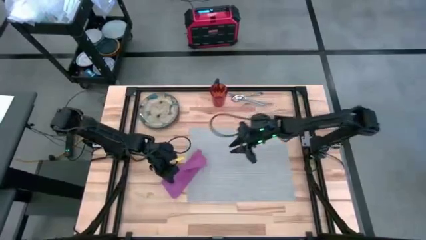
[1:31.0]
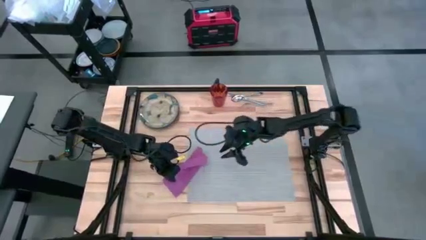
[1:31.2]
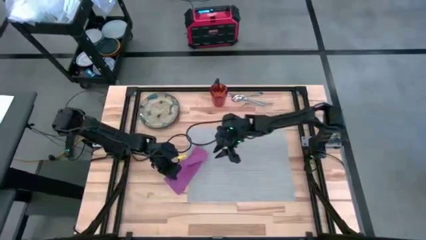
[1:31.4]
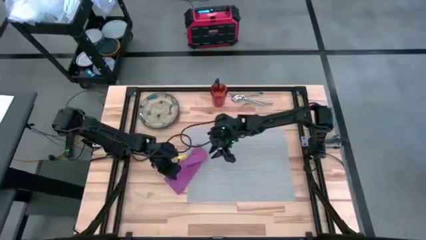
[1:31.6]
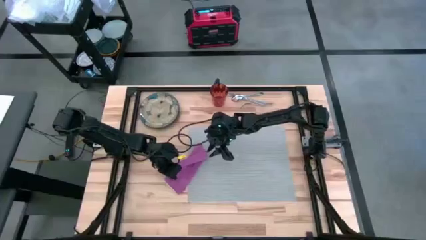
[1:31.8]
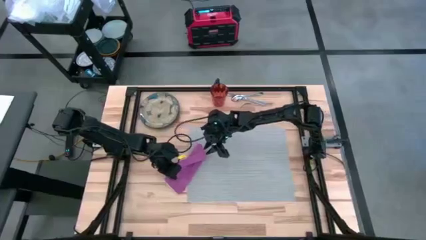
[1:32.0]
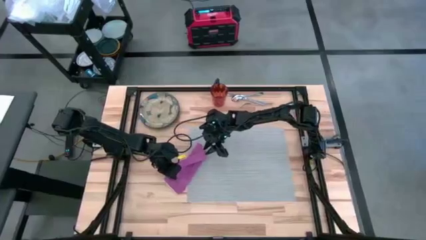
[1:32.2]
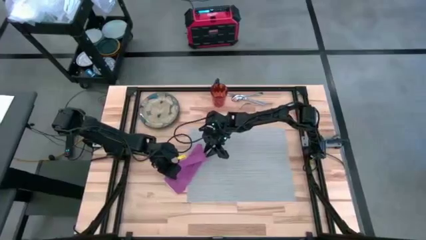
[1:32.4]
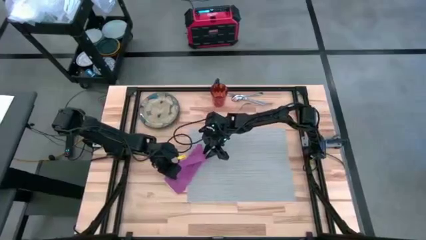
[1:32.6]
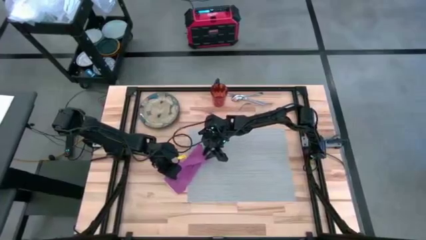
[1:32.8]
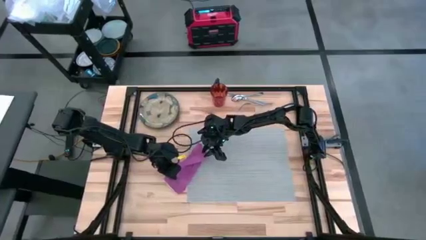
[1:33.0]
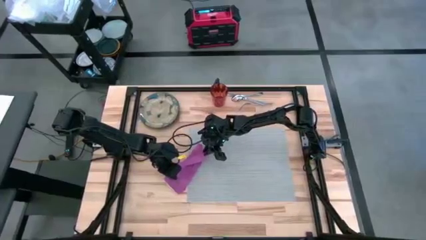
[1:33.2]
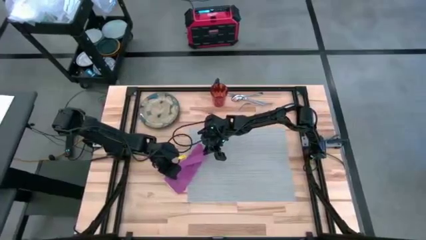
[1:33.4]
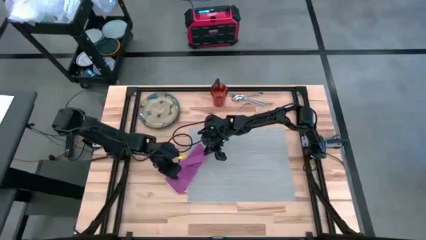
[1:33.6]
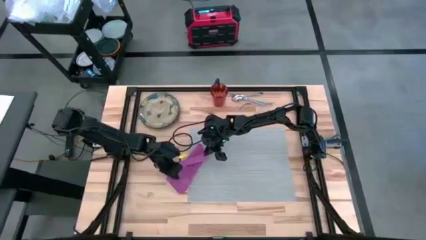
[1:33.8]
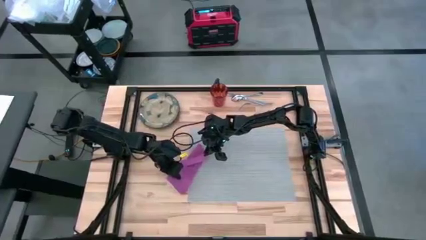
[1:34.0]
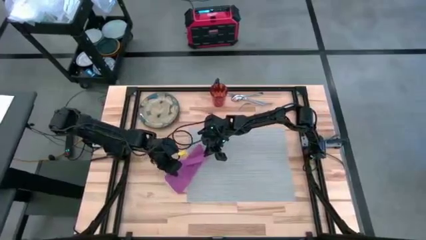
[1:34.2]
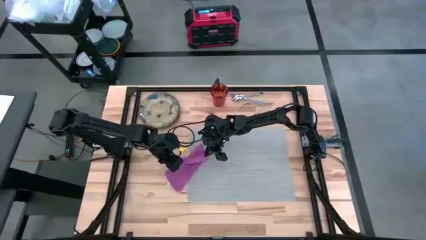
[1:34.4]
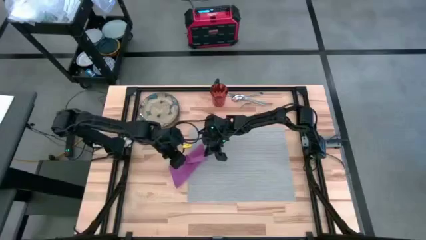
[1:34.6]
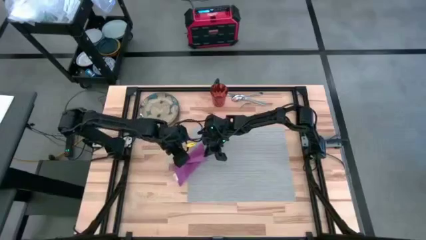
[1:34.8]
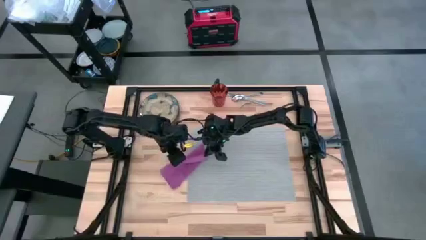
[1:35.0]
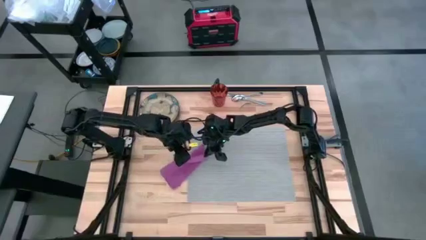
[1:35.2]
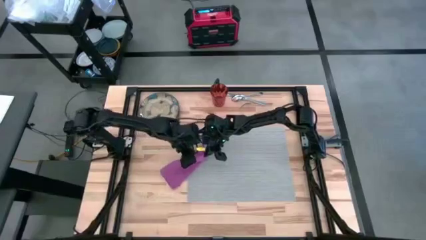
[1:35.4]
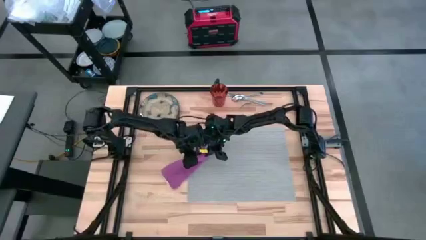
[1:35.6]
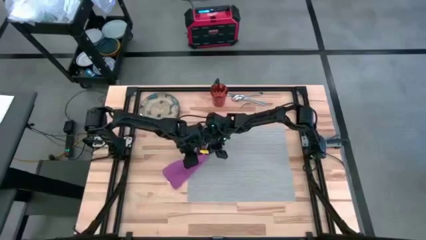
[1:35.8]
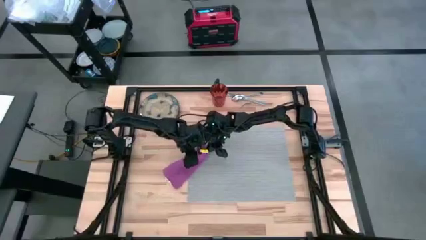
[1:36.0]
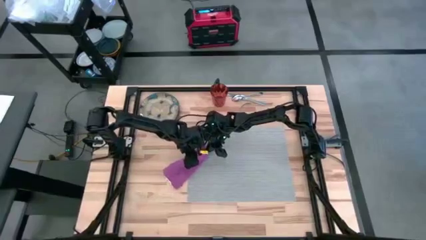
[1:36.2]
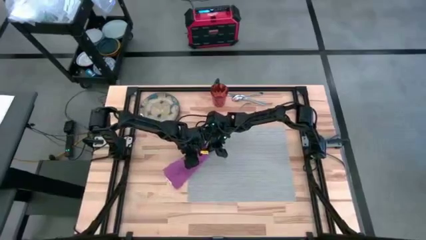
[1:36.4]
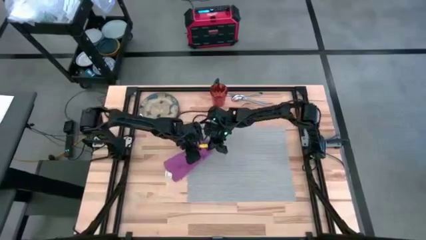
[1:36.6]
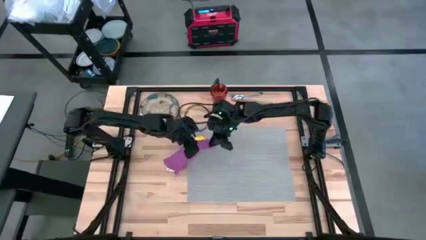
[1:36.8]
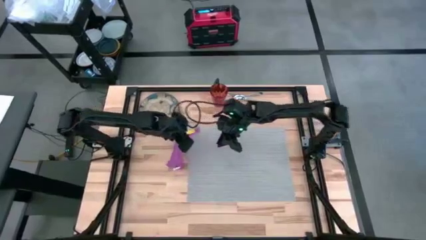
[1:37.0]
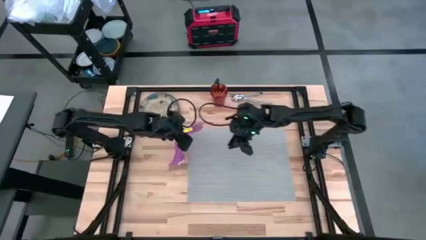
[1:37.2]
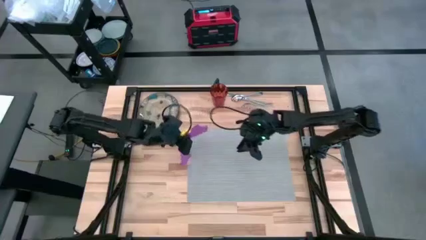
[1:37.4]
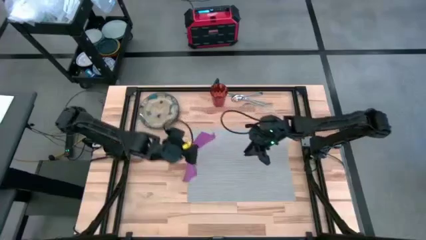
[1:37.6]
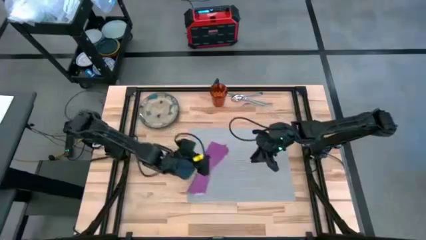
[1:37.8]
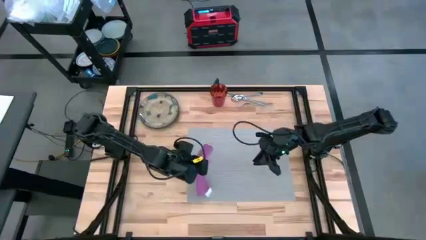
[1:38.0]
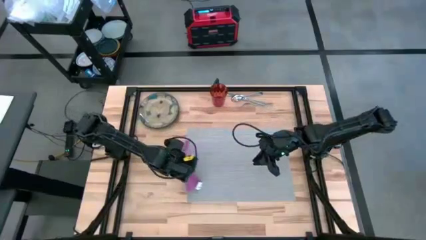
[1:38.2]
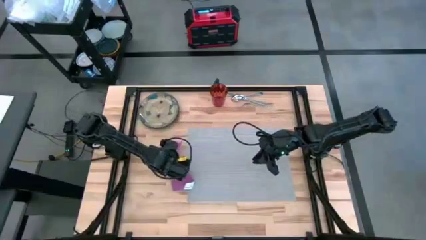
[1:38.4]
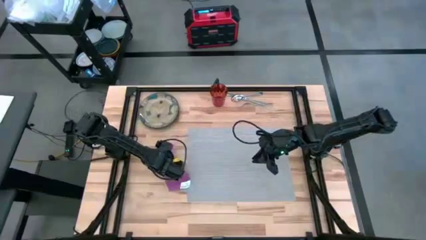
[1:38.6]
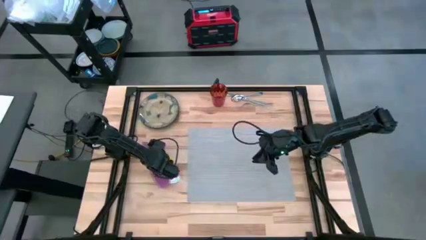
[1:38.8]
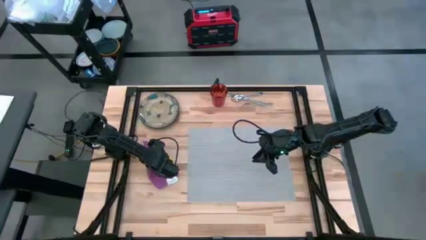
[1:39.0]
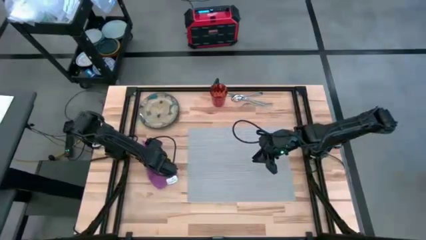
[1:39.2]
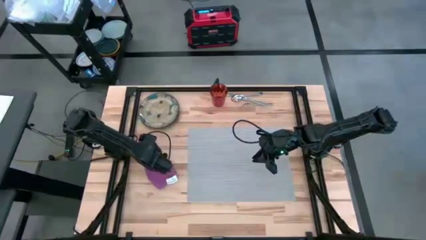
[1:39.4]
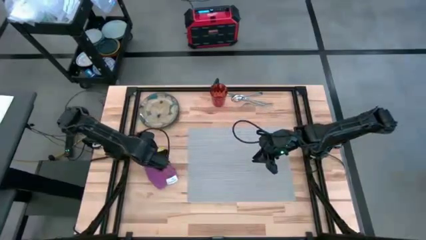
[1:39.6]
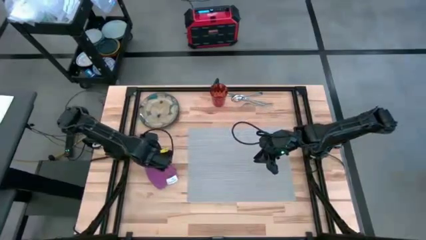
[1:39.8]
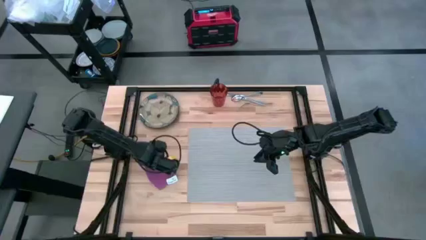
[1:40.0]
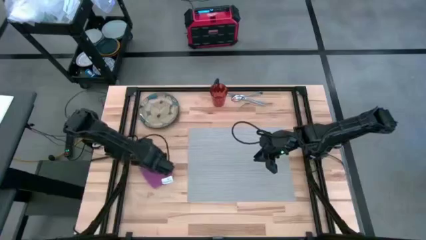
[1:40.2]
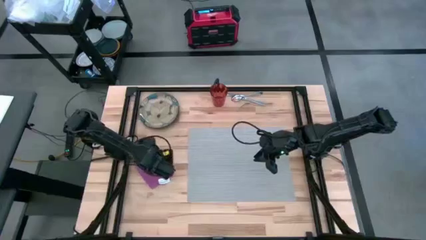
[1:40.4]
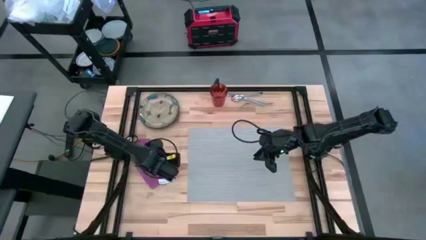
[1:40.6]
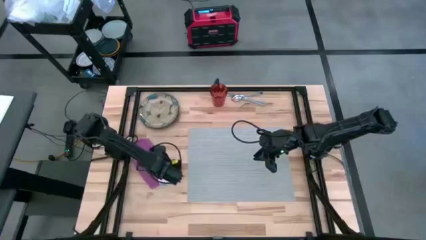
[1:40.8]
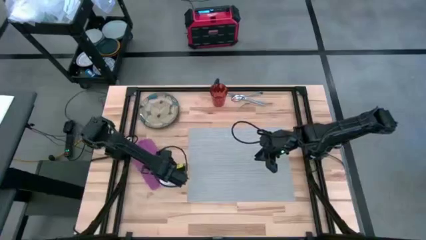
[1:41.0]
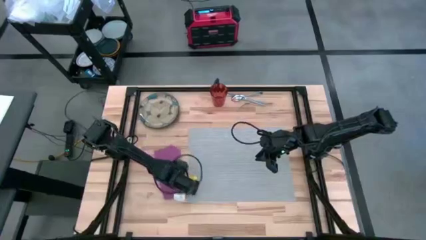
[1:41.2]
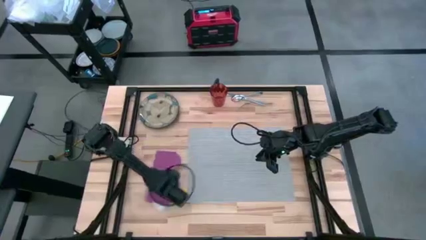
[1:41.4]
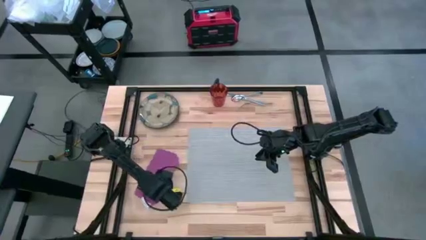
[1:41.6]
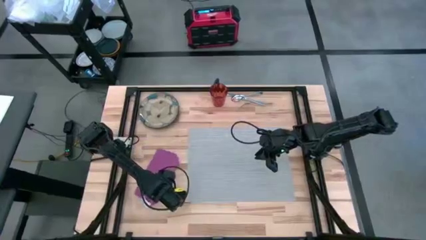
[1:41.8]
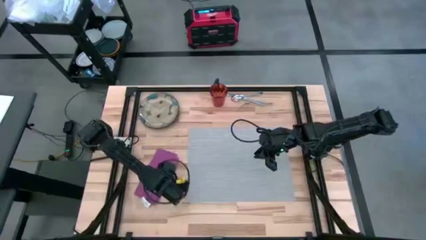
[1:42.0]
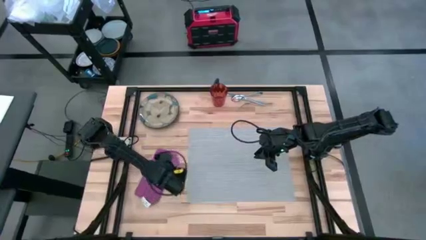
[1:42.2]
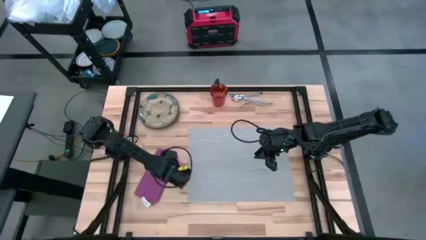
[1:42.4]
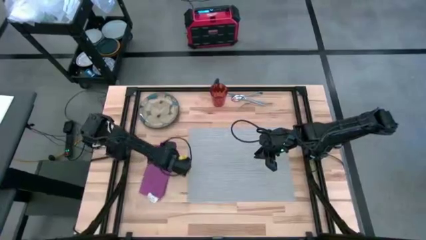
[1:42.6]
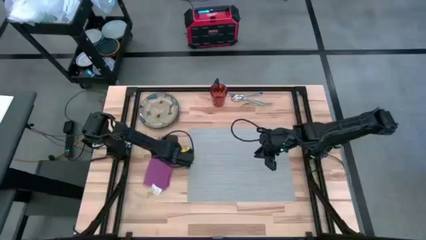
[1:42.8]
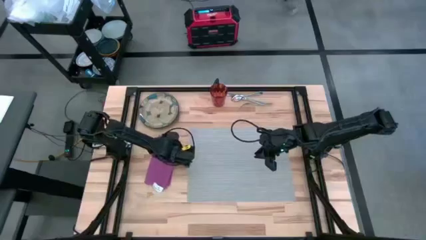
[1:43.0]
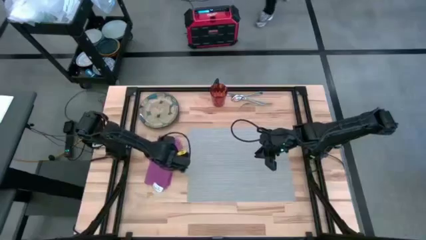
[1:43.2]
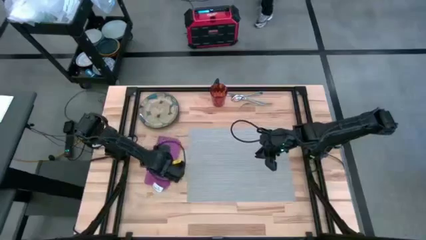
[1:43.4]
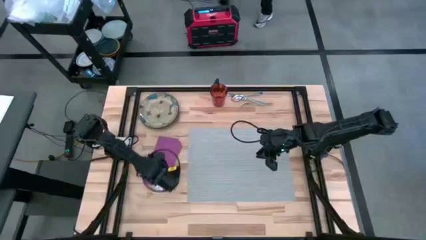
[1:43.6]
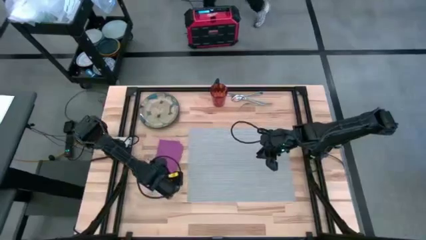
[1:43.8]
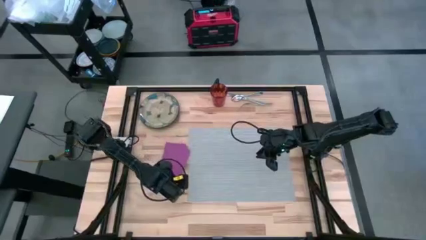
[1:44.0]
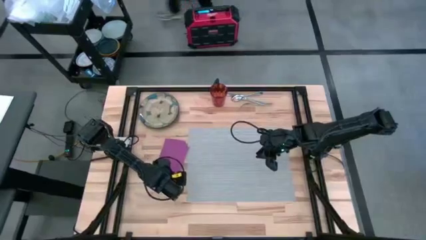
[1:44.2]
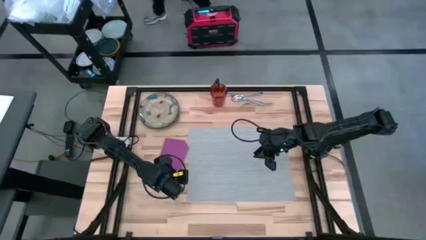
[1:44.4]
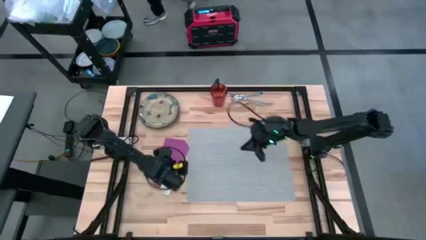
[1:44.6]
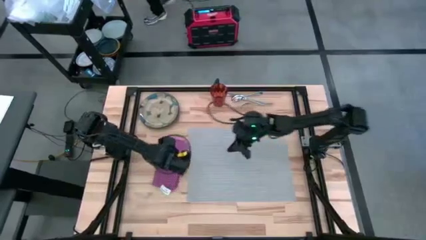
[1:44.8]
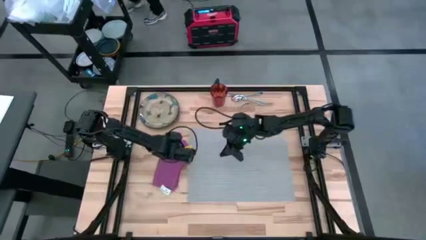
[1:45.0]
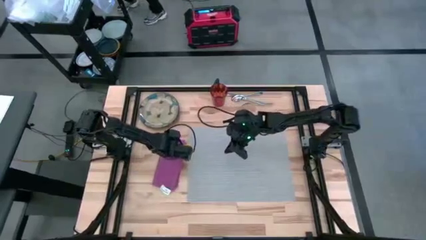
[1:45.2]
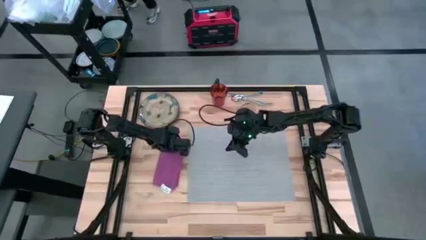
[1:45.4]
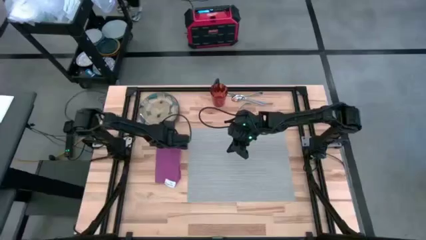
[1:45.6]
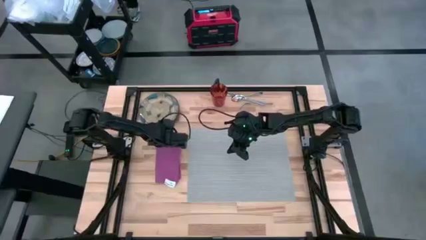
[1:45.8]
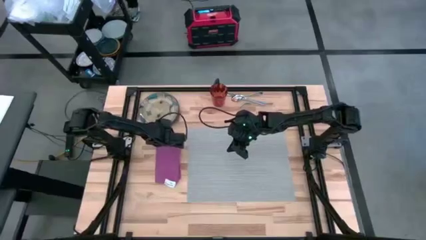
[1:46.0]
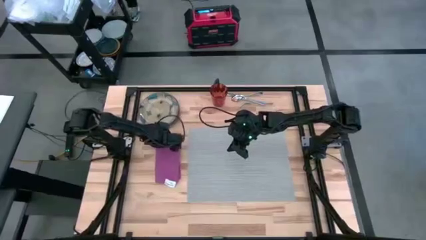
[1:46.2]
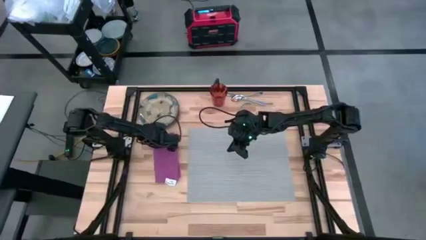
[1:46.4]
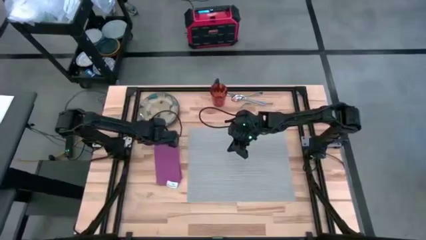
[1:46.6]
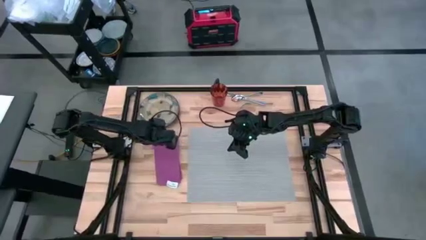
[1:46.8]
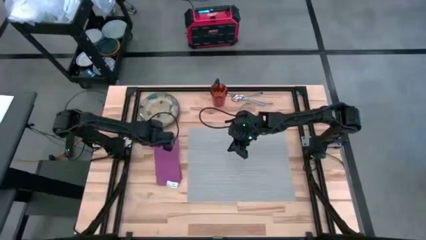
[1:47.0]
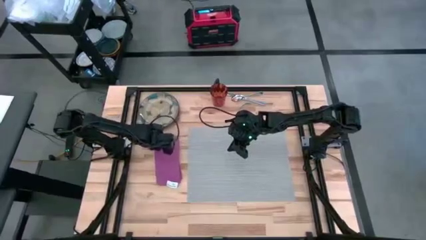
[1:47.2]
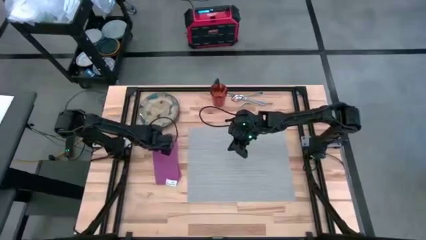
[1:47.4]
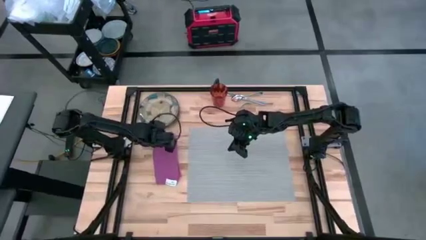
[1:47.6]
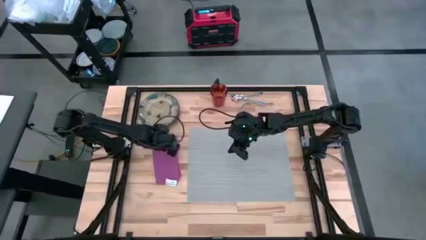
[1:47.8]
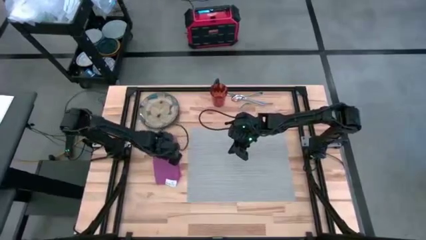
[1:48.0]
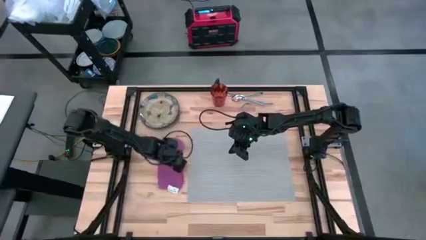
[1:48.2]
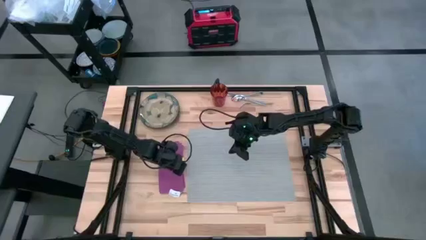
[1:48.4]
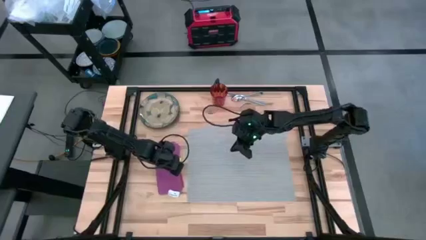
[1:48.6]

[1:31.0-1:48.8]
Task: Set table place
Fold the pink table napkin
